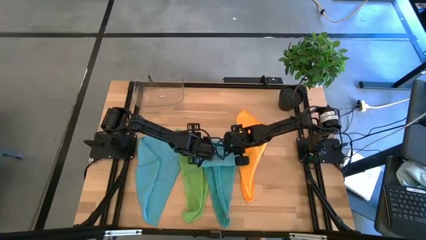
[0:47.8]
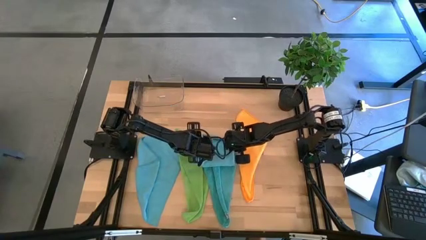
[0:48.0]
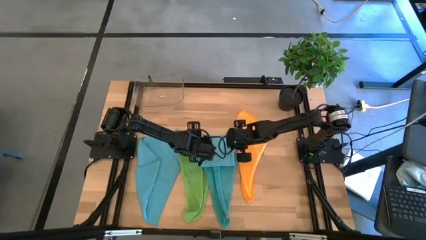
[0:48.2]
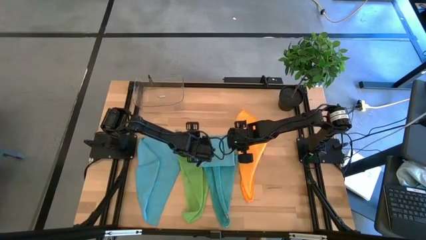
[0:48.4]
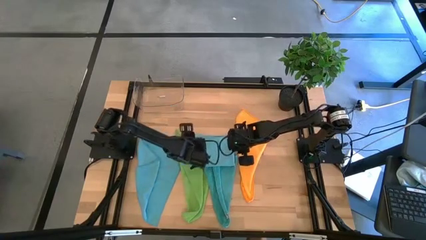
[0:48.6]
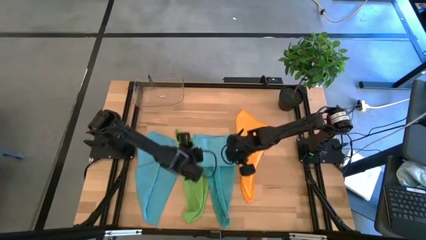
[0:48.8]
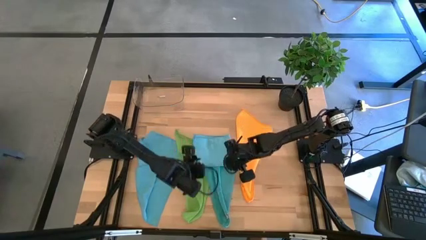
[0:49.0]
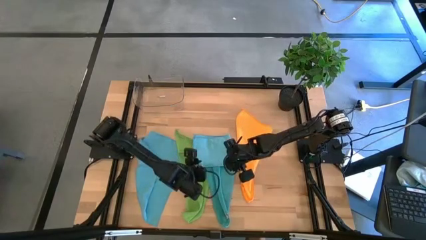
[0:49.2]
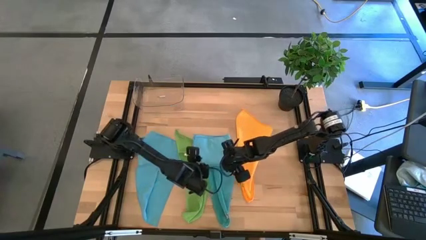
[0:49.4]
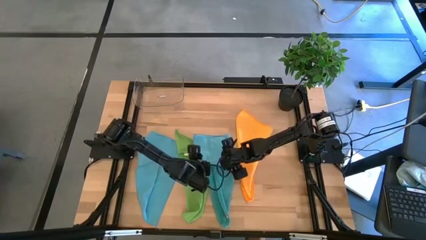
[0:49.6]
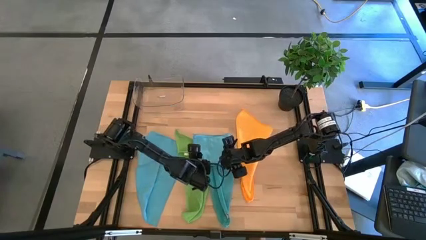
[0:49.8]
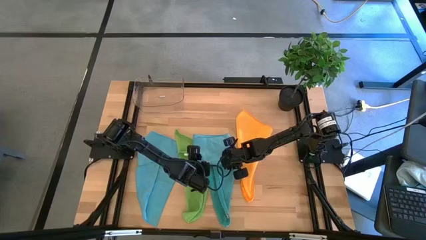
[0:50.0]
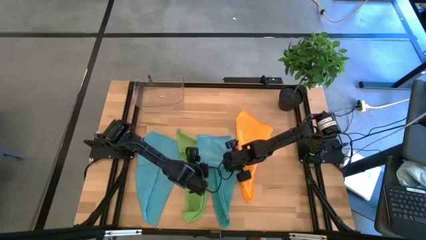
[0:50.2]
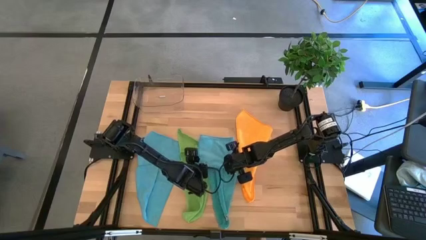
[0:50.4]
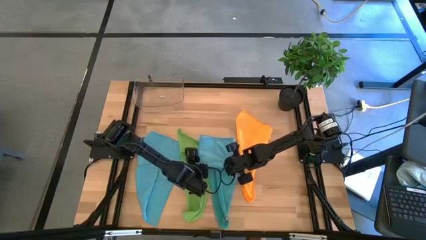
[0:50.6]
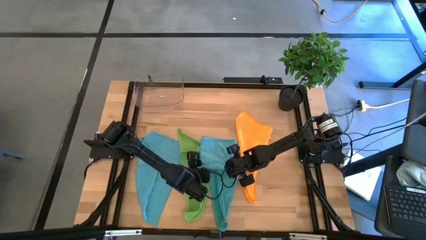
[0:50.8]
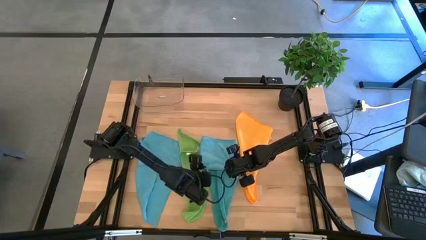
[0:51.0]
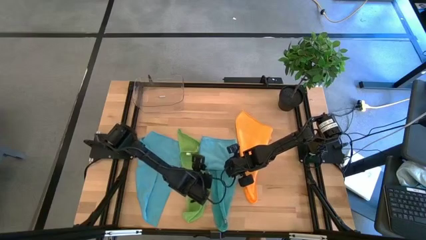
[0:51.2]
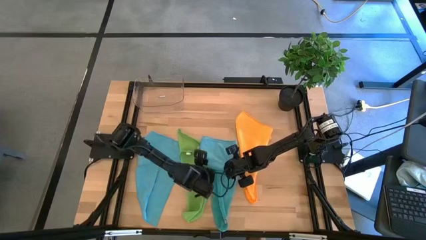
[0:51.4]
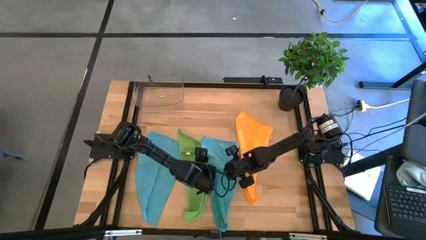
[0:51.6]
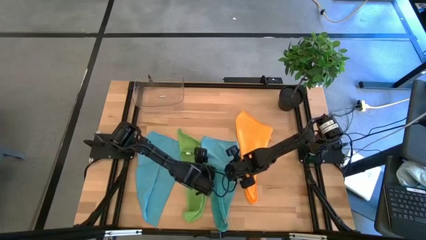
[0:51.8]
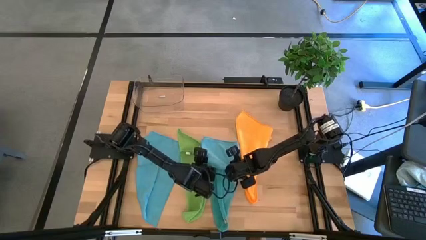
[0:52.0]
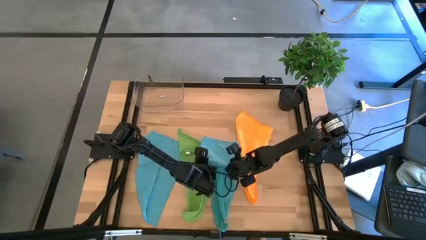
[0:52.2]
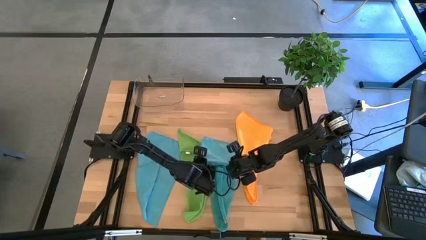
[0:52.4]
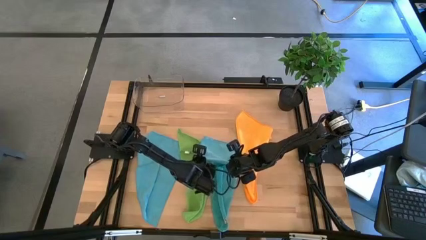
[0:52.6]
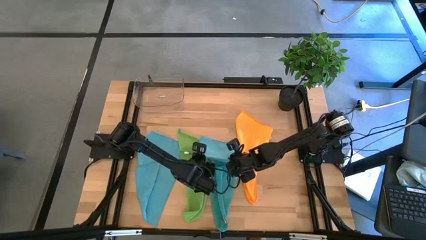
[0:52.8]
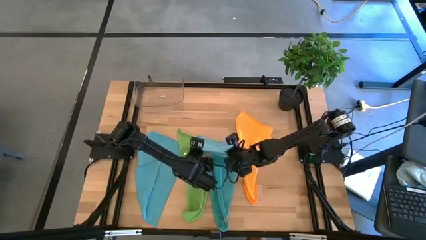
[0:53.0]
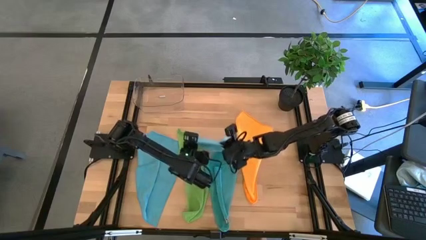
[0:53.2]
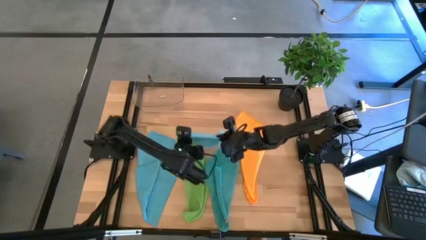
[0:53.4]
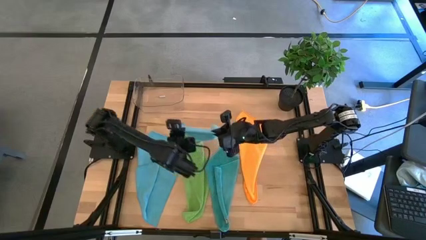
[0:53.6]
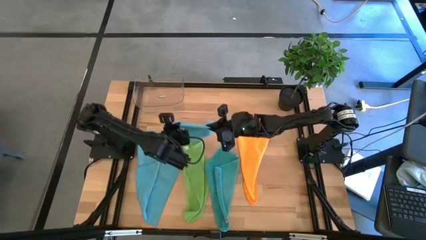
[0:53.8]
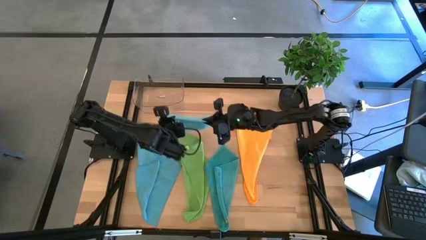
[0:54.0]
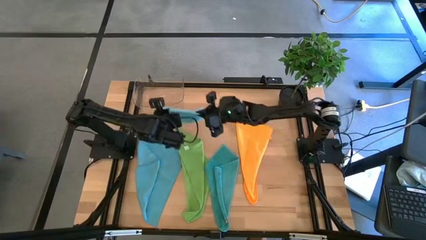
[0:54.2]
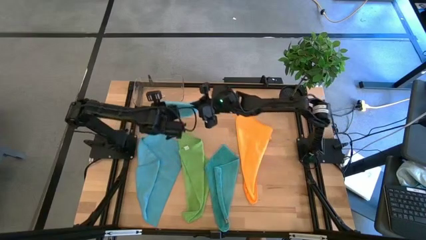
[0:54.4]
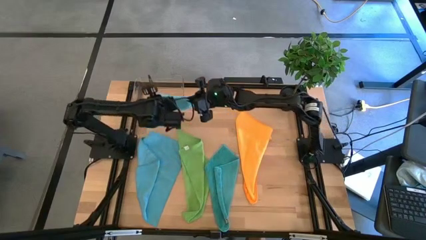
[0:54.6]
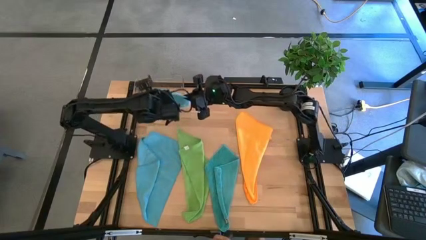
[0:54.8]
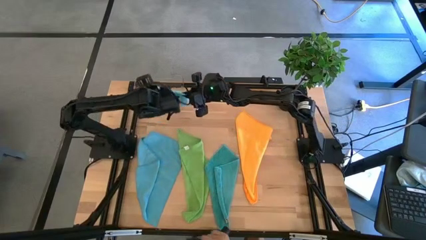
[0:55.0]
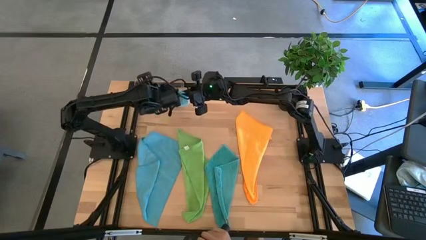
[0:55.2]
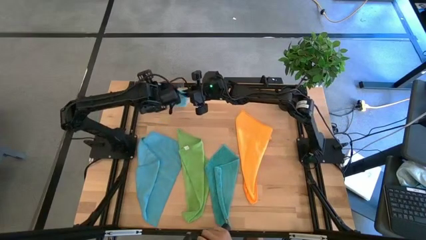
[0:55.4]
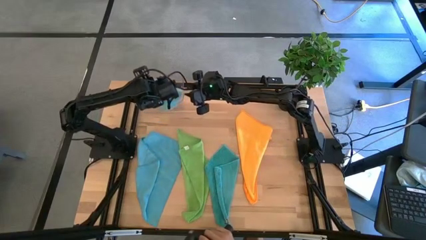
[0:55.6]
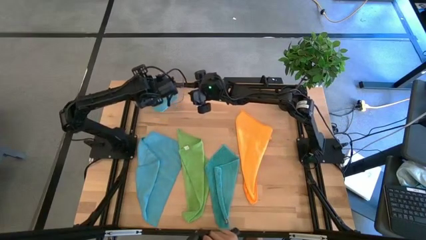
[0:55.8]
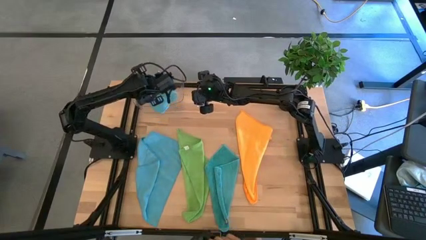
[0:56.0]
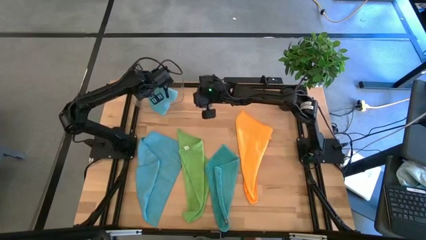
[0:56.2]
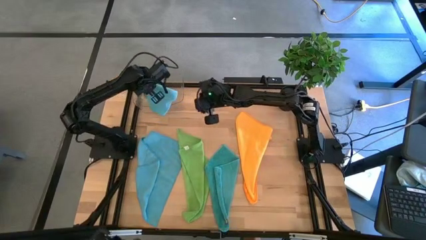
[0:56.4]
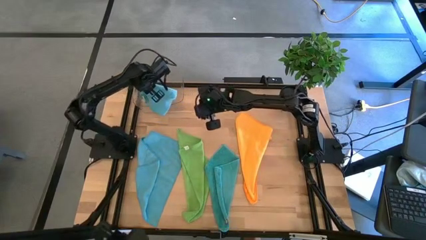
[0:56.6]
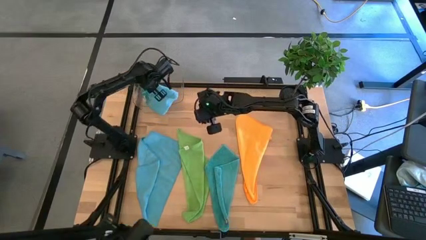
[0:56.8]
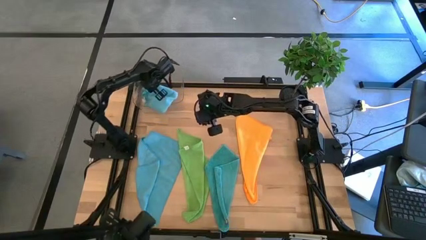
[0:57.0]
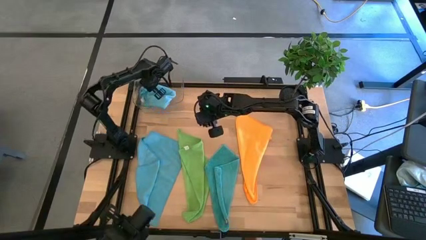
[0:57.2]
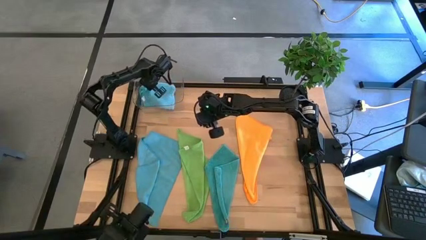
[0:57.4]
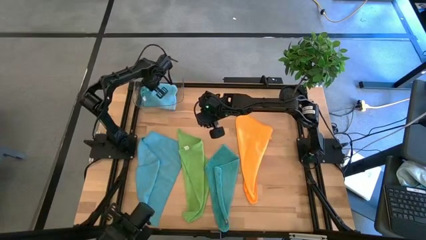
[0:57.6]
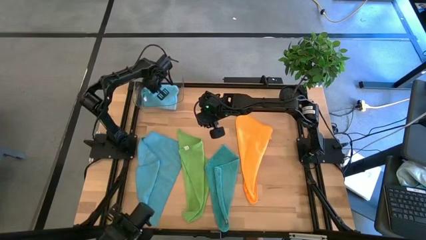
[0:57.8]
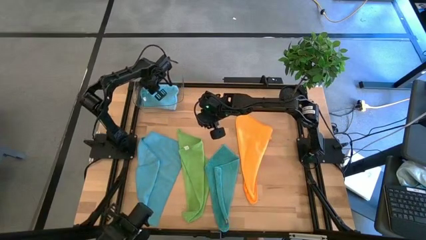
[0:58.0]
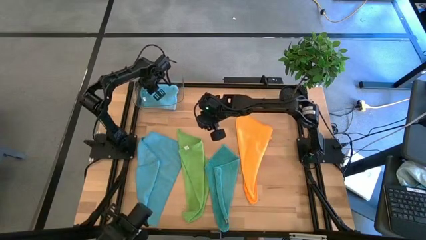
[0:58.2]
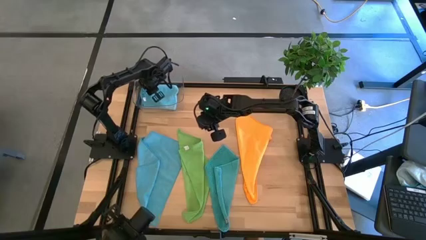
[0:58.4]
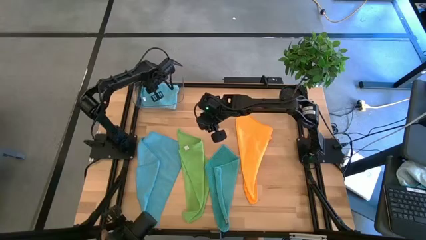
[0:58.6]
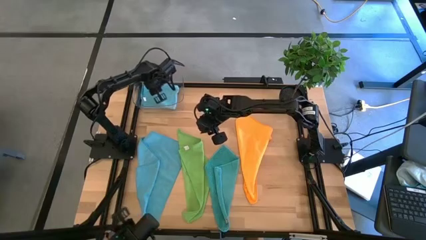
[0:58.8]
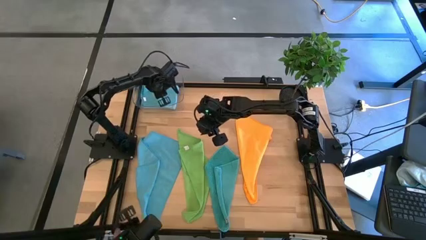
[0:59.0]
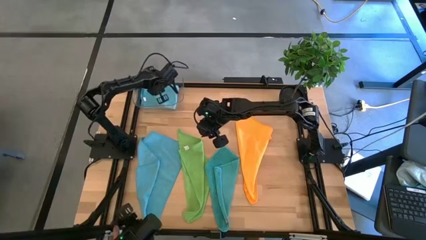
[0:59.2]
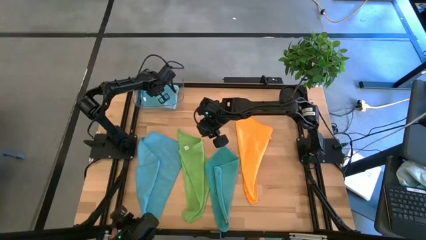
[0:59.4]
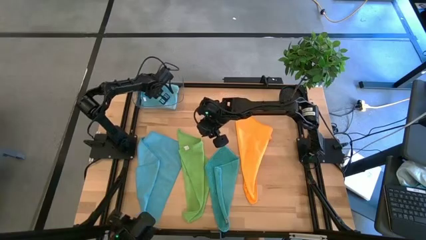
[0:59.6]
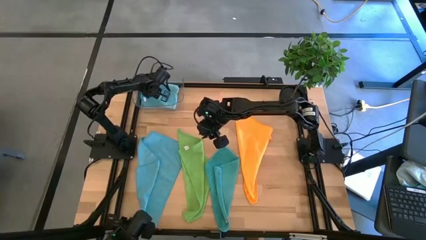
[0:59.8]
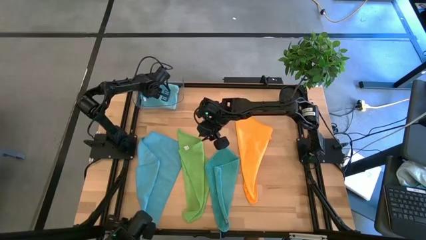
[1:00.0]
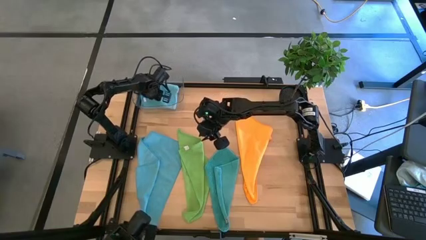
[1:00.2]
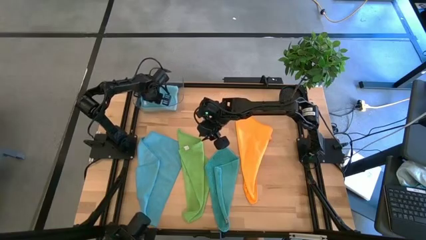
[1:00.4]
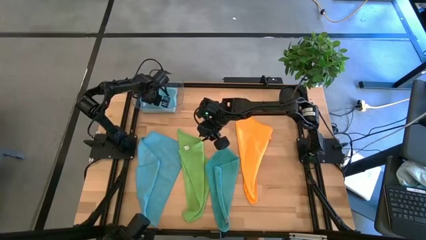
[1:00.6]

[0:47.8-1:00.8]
Task: Fold microfiber towels
Put the light blue microfiber cloth into the transparent bin
